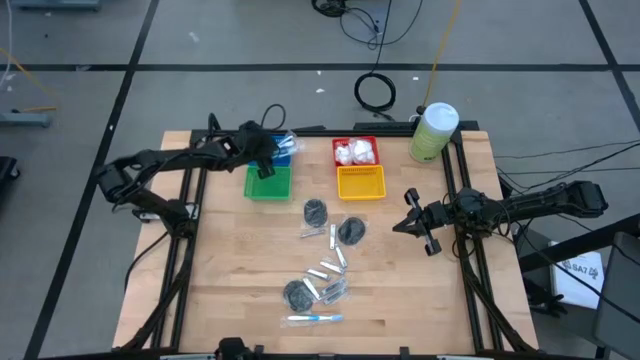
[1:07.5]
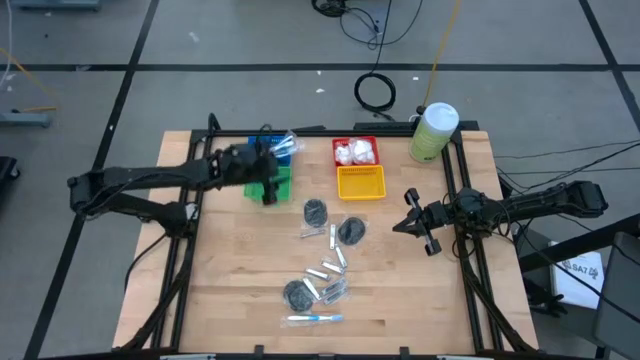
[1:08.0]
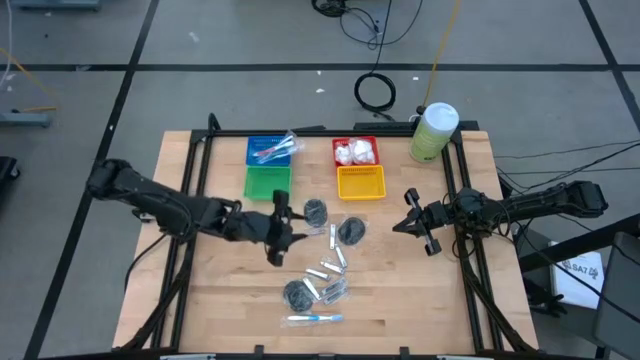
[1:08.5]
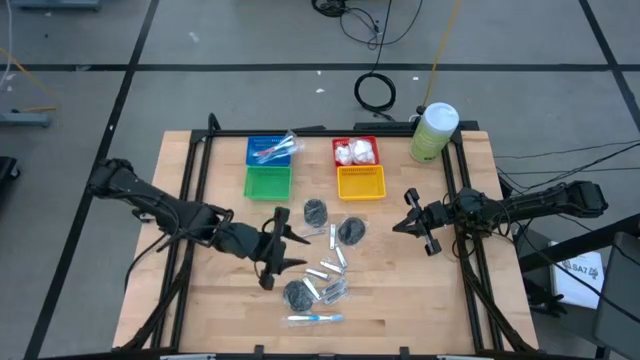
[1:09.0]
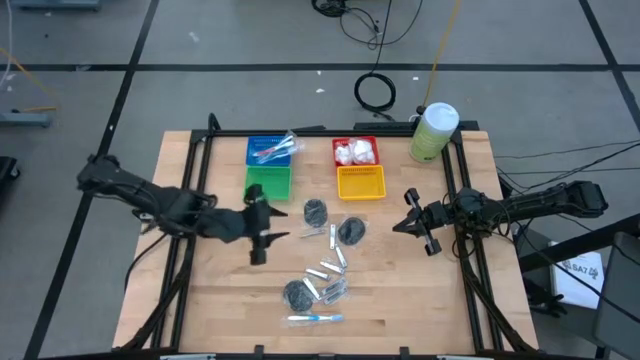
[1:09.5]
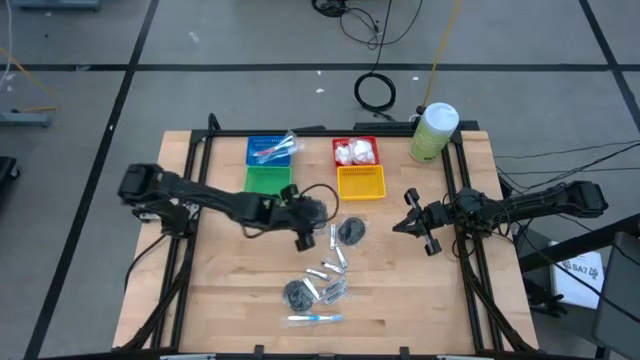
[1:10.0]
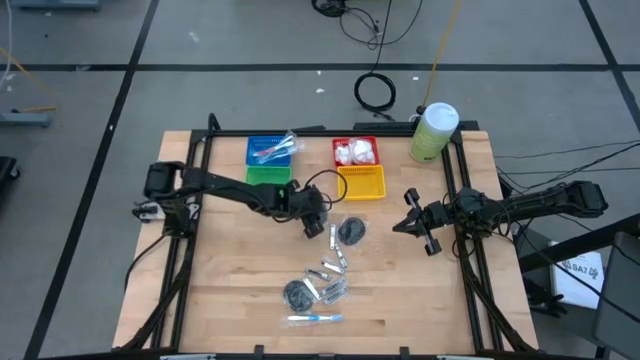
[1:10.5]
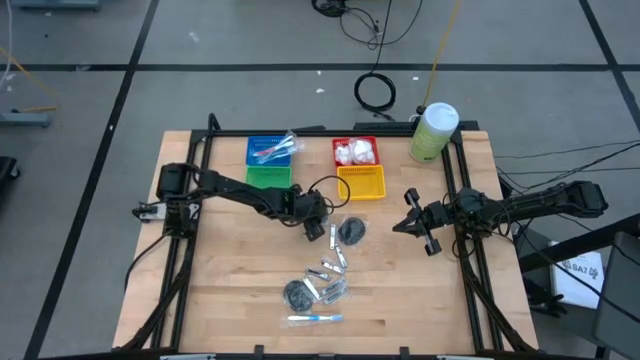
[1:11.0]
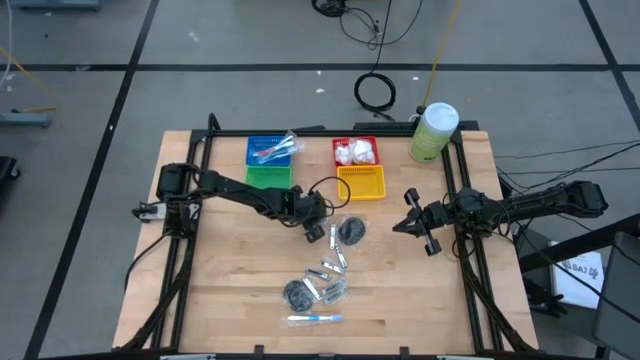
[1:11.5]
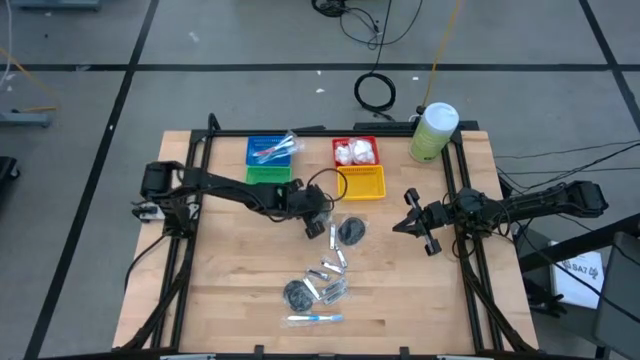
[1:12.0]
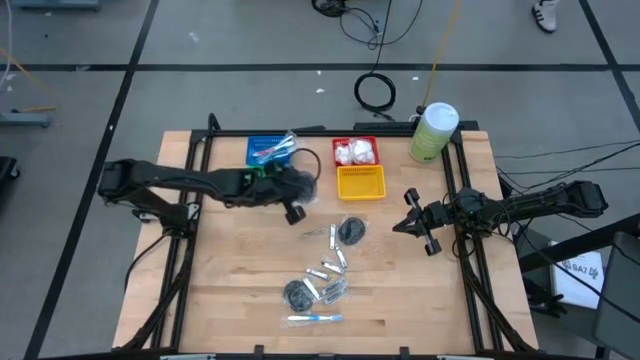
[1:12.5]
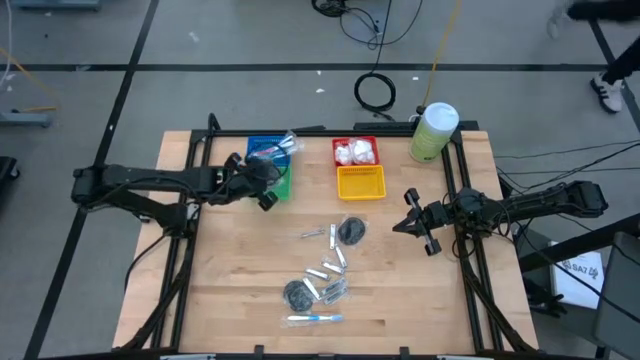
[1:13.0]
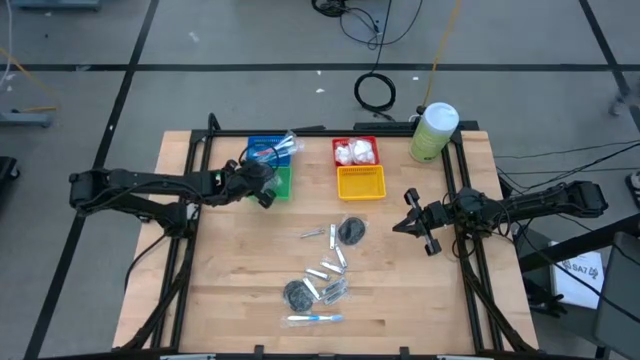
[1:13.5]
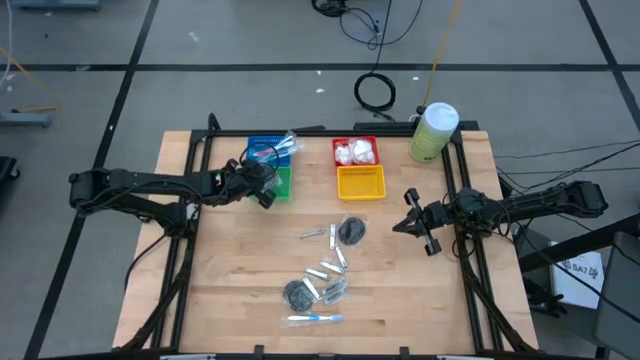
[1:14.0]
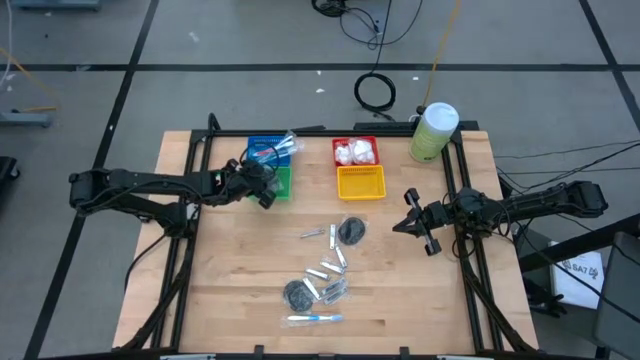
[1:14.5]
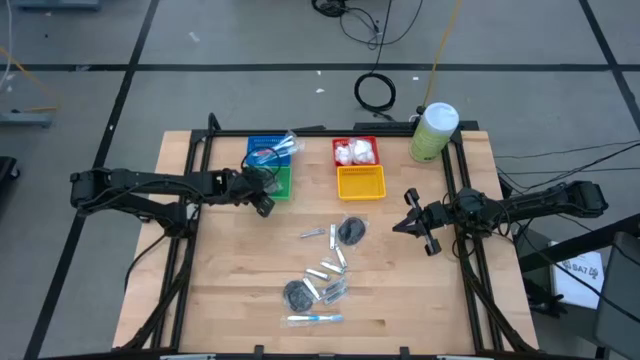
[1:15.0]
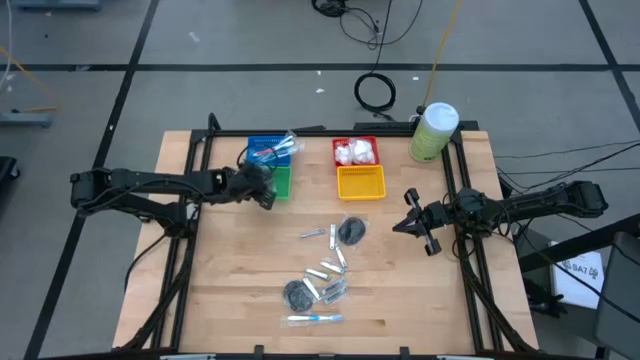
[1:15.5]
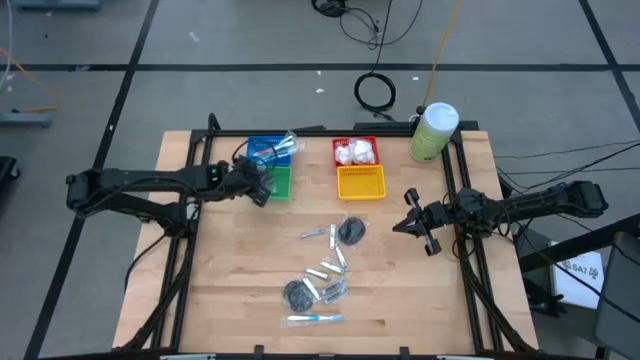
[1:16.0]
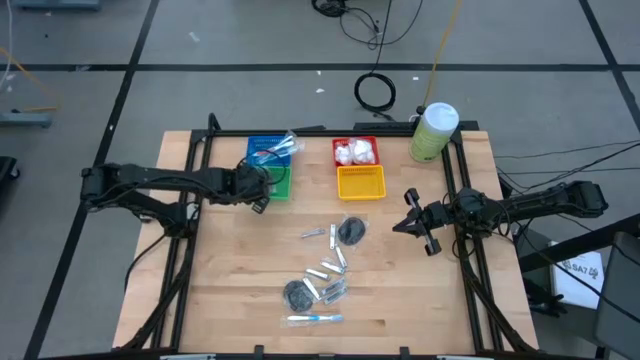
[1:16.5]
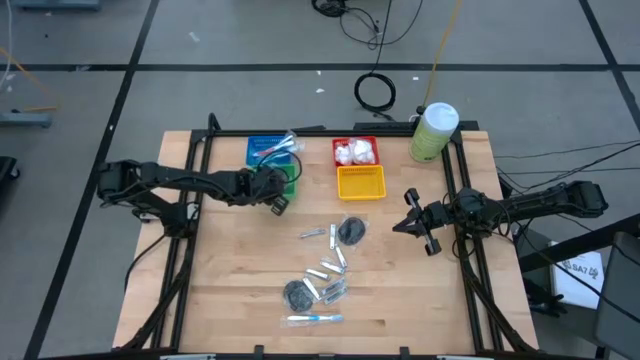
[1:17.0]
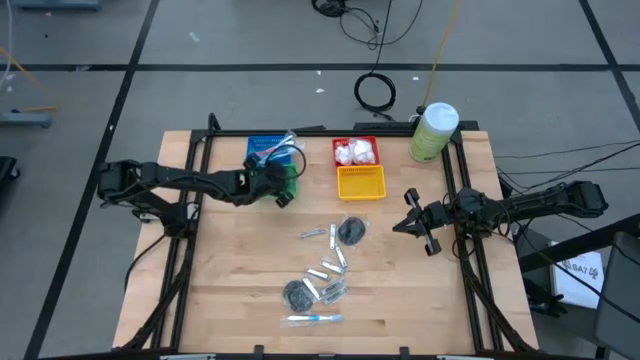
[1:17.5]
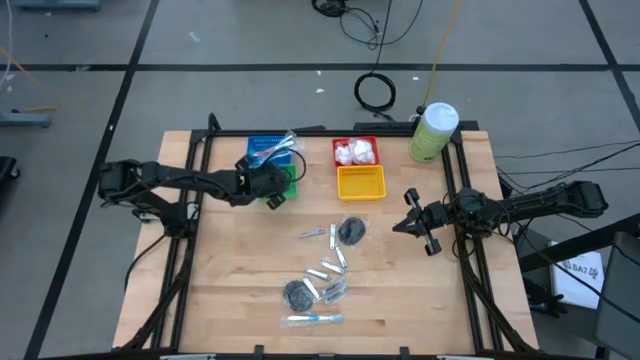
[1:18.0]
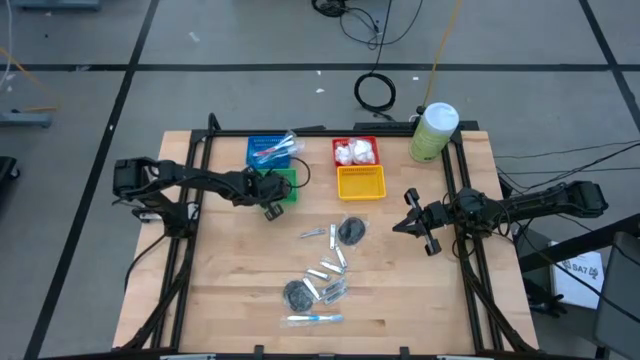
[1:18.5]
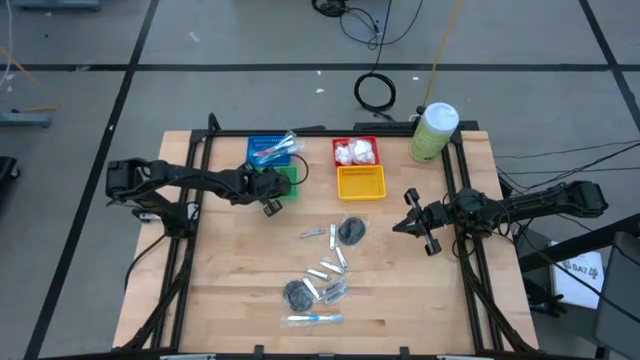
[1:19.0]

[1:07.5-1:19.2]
Task: Pick & Place Travel size toiletries
Put the black hairbrush into the green bin

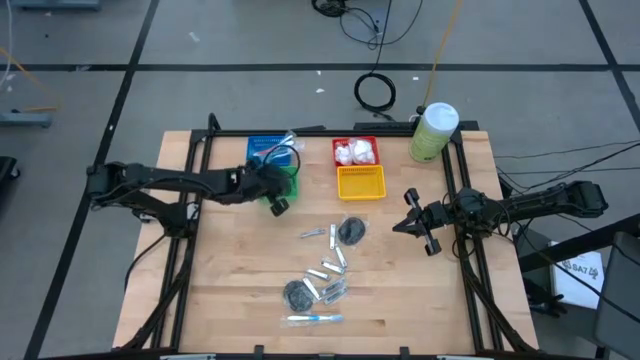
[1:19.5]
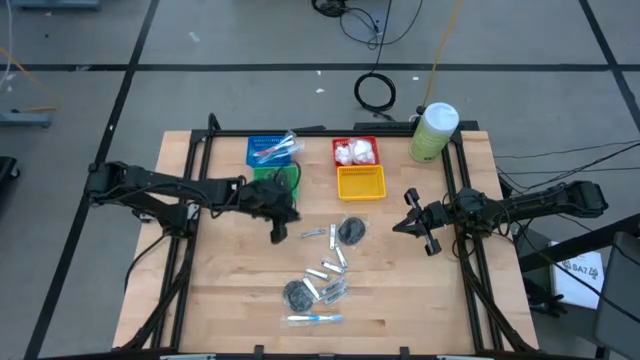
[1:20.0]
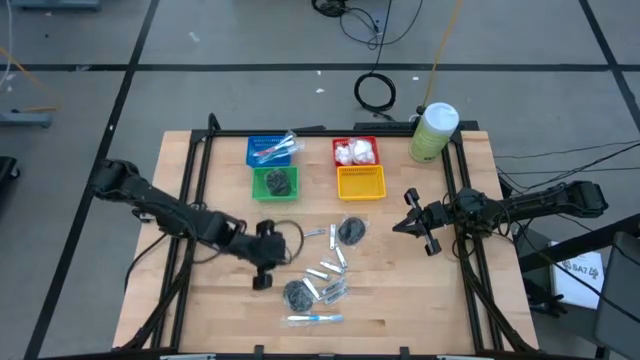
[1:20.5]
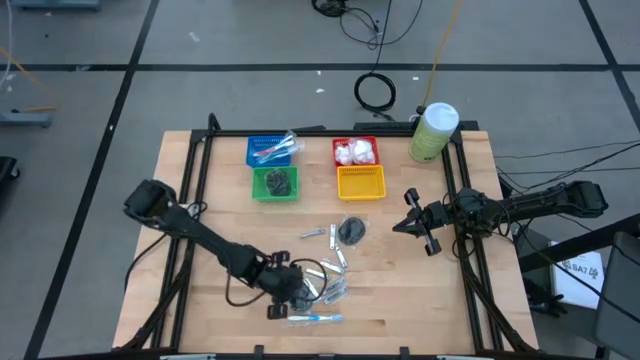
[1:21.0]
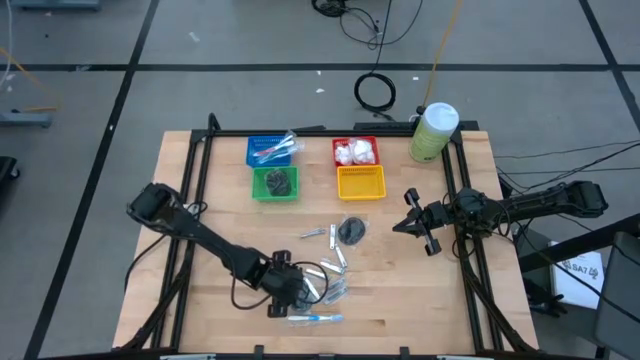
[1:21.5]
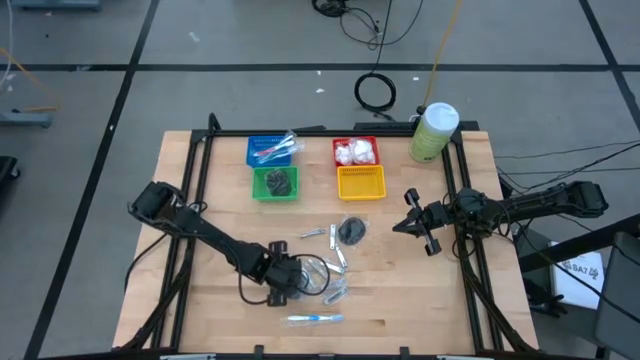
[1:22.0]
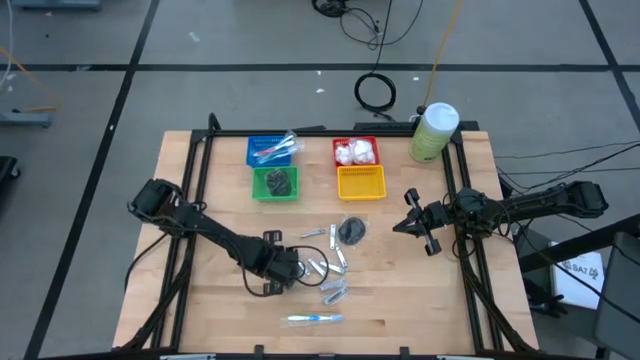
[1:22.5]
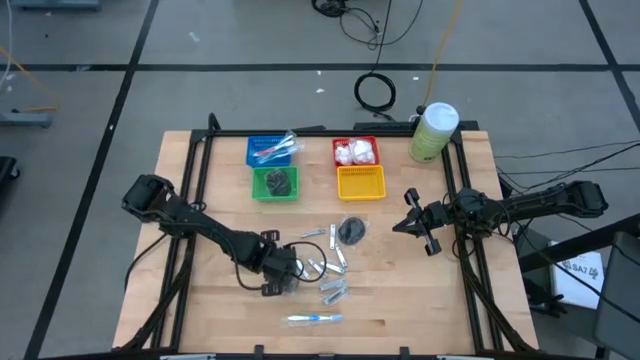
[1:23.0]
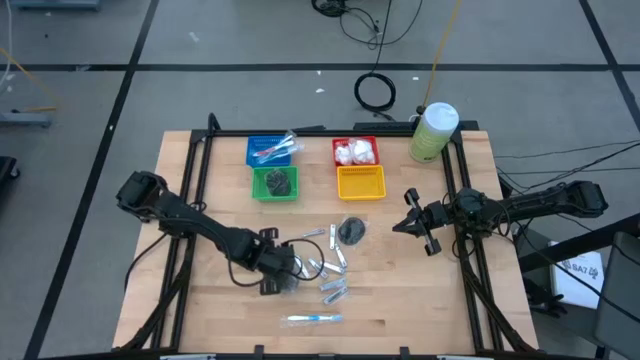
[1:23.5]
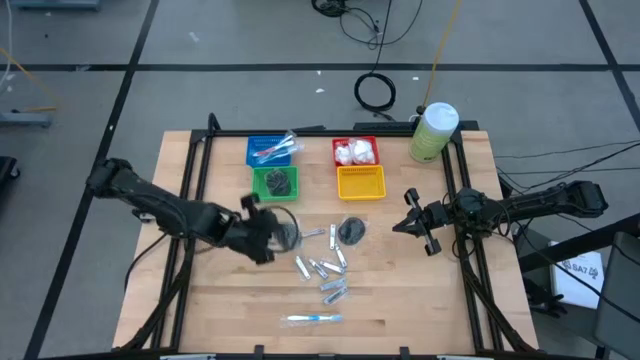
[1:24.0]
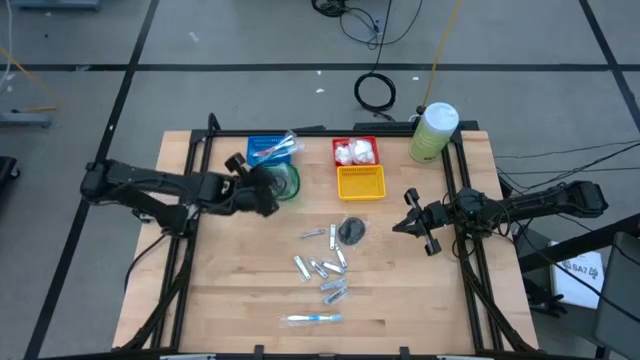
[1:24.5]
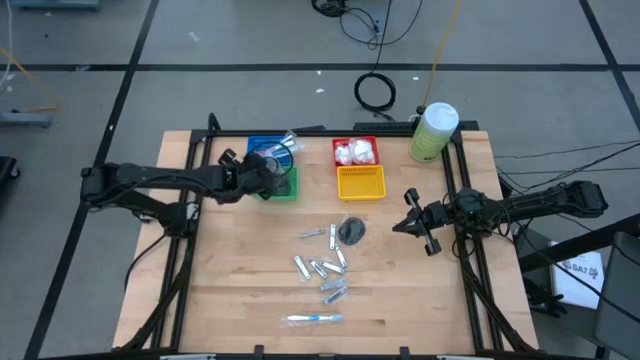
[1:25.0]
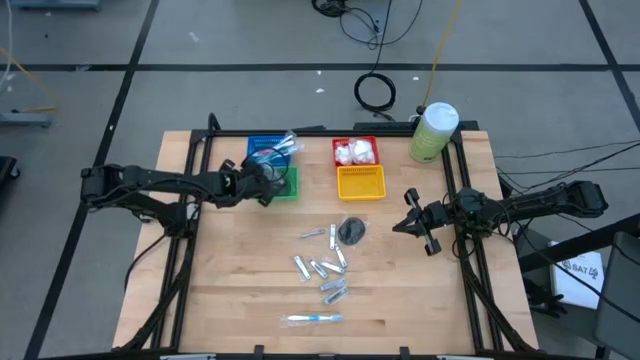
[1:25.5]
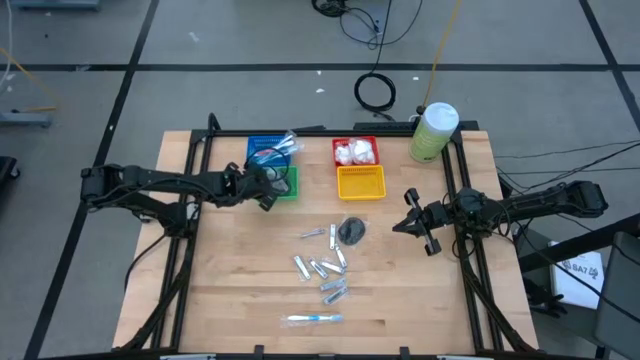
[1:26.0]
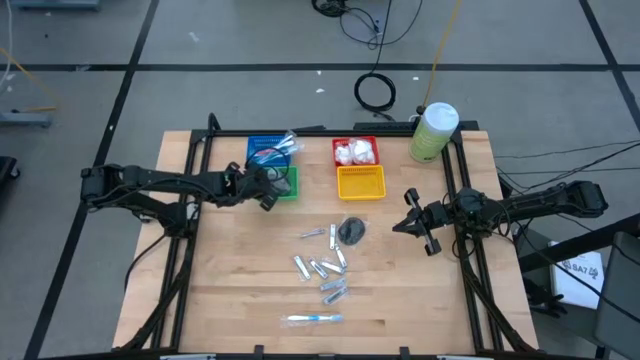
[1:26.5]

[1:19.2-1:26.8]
Put the black hair brush into the green bin

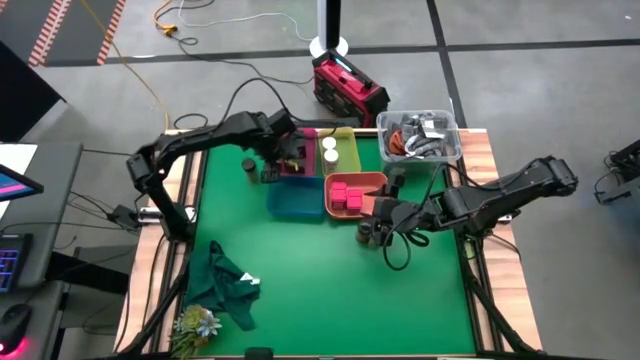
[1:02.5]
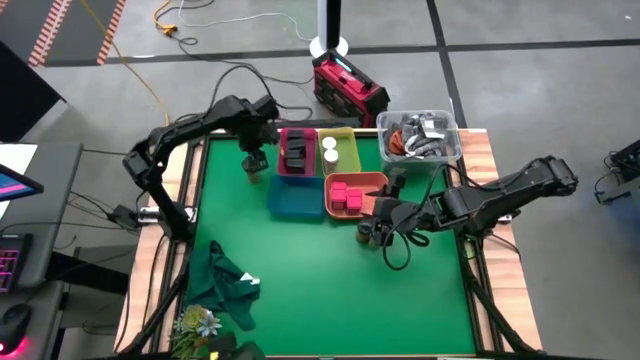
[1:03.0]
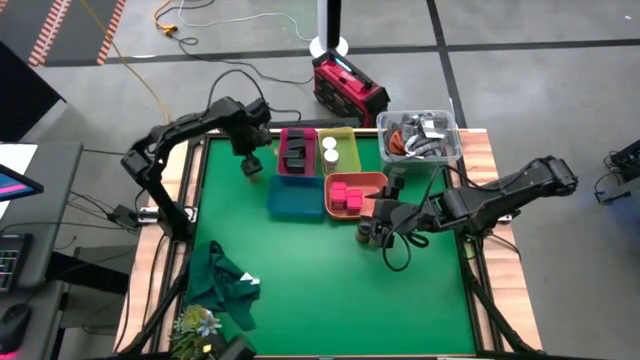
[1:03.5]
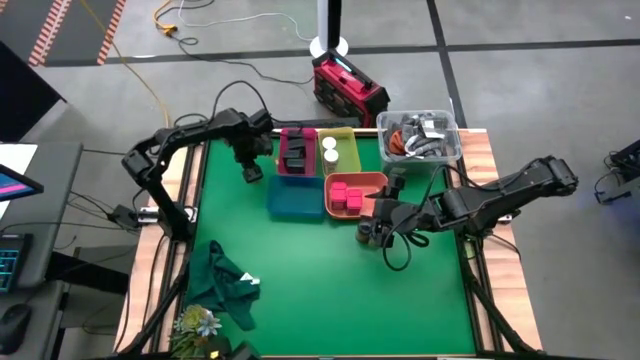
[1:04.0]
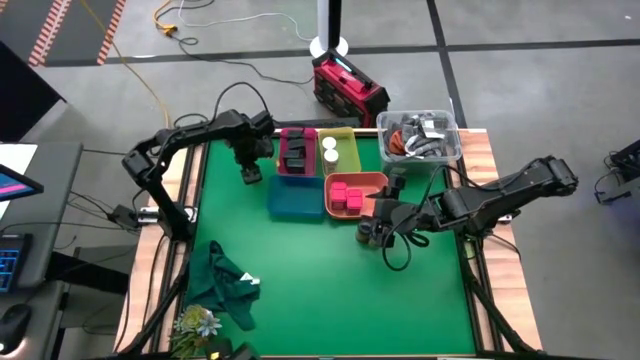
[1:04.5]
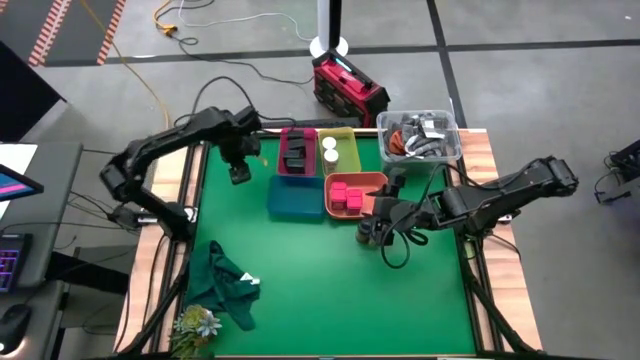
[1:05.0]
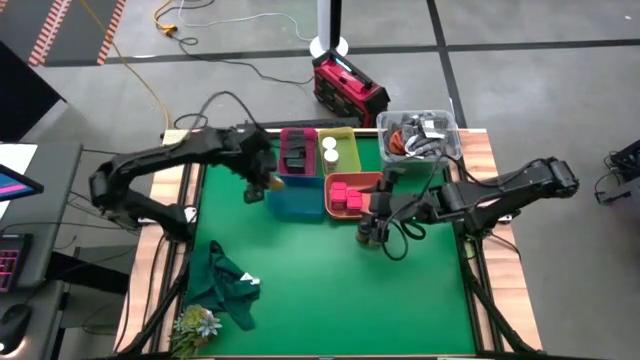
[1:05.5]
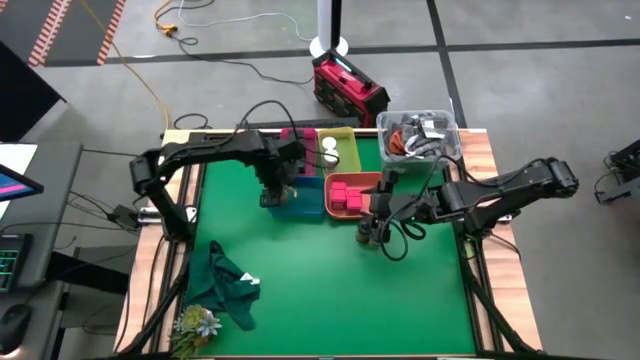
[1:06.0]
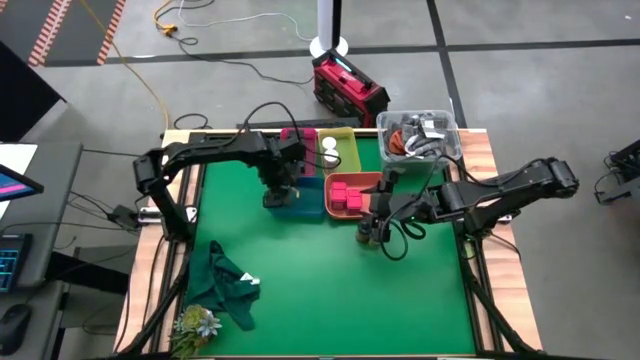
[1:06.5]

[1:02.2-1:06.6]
Task: Sort spices by type
Put the top brown seasoning bottle into the blue bin
